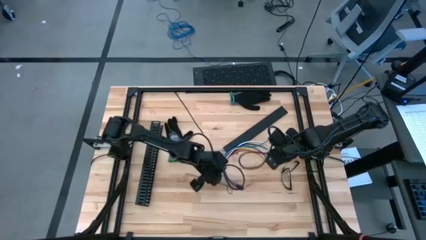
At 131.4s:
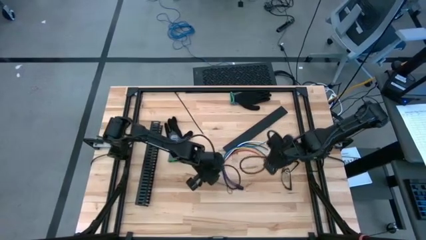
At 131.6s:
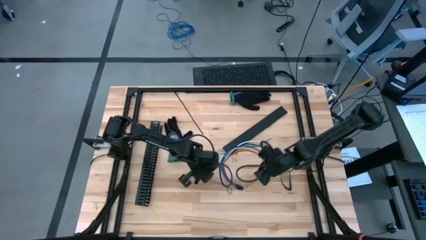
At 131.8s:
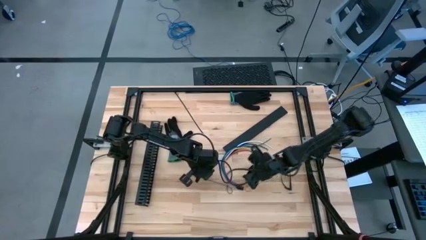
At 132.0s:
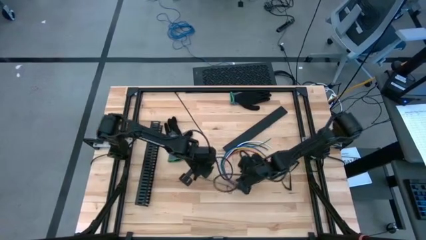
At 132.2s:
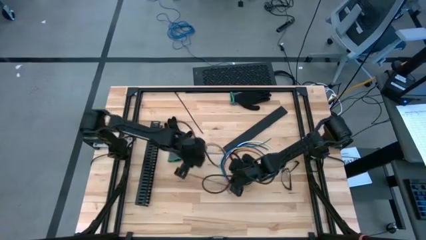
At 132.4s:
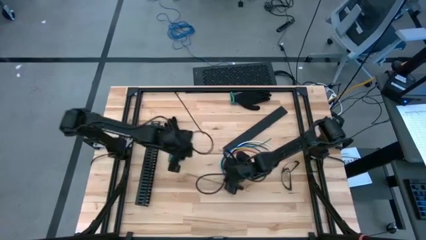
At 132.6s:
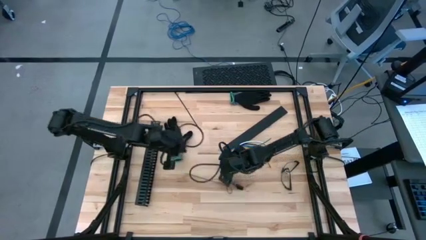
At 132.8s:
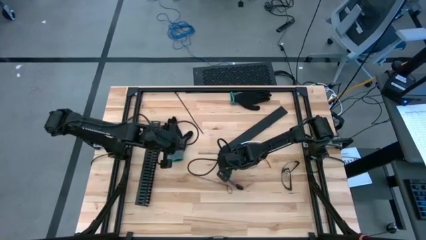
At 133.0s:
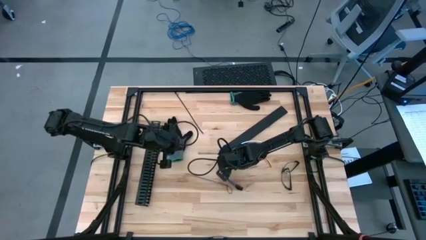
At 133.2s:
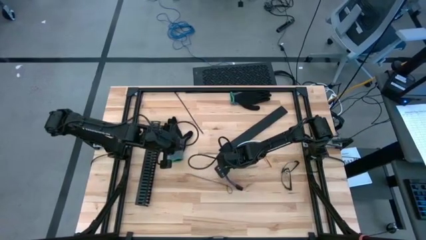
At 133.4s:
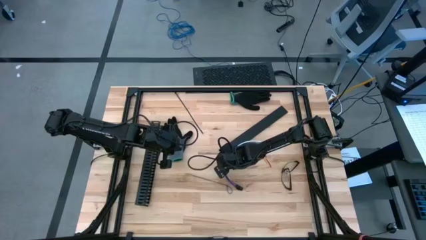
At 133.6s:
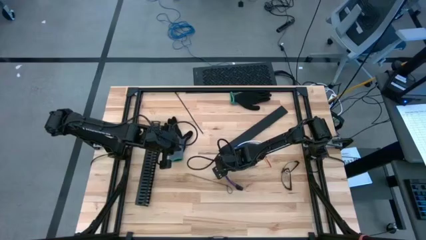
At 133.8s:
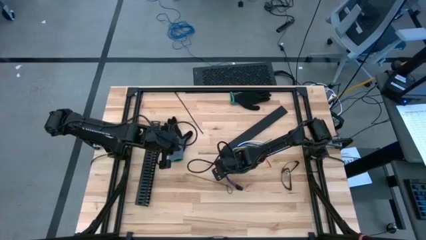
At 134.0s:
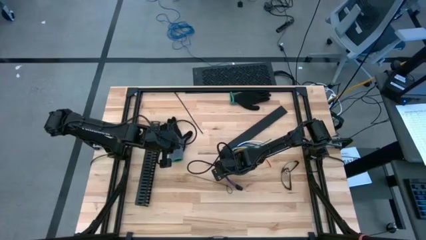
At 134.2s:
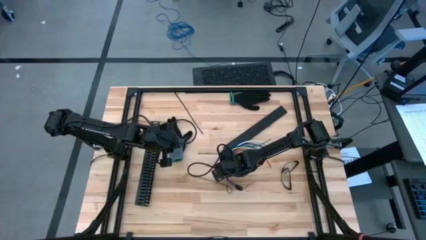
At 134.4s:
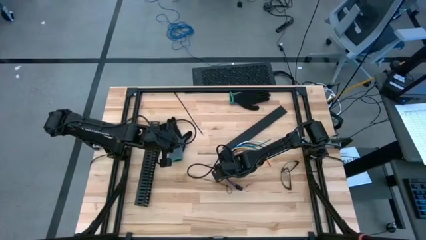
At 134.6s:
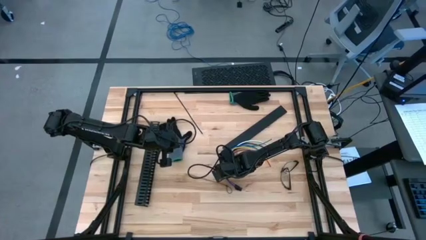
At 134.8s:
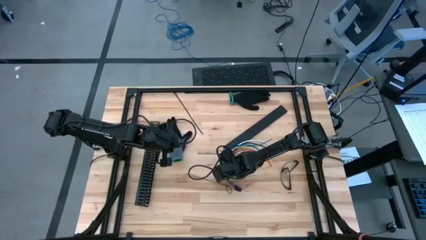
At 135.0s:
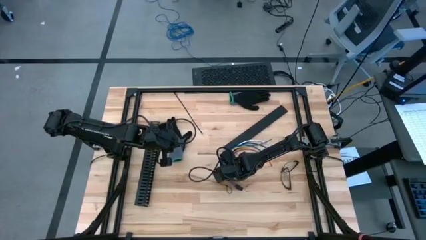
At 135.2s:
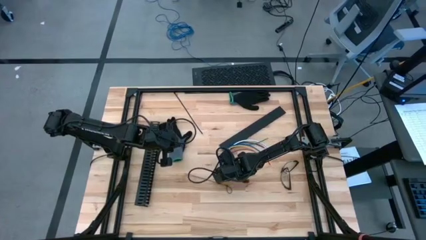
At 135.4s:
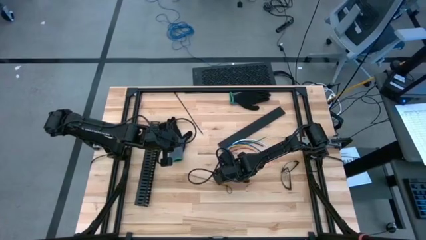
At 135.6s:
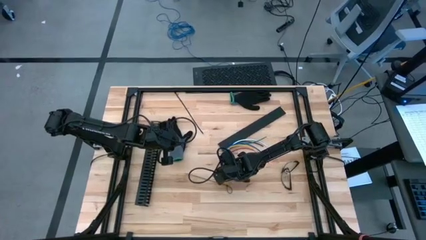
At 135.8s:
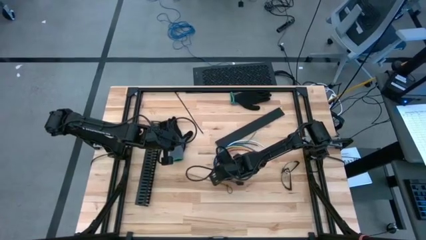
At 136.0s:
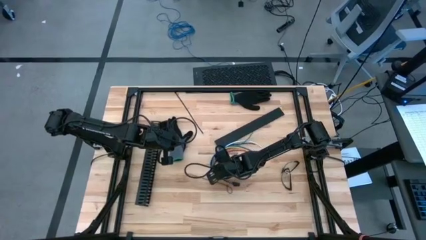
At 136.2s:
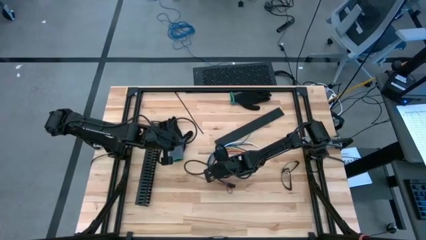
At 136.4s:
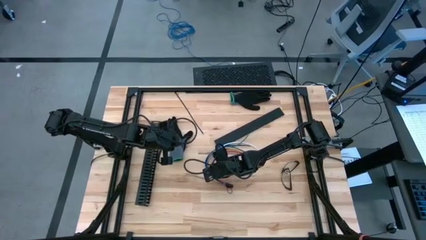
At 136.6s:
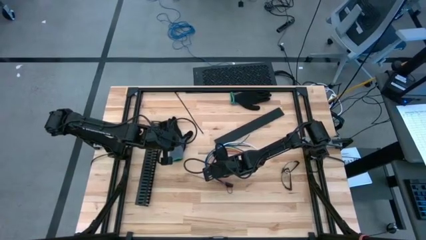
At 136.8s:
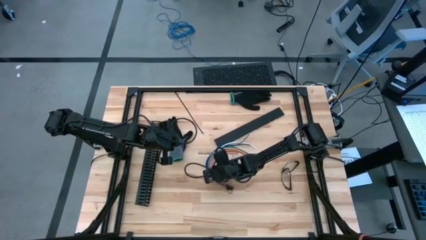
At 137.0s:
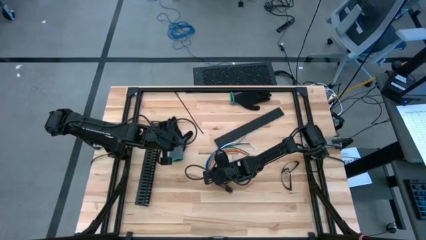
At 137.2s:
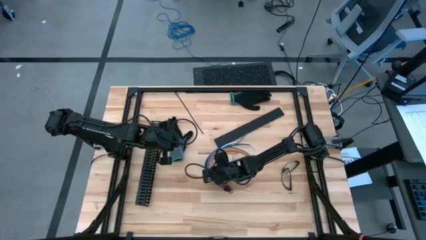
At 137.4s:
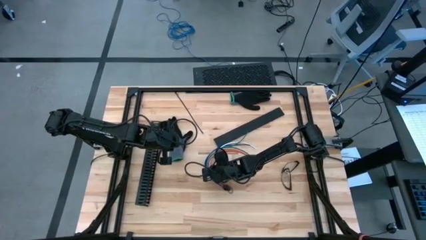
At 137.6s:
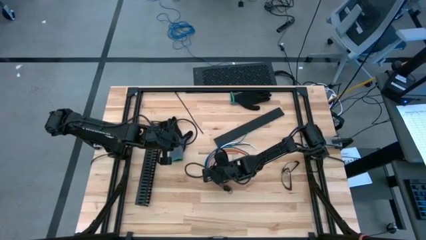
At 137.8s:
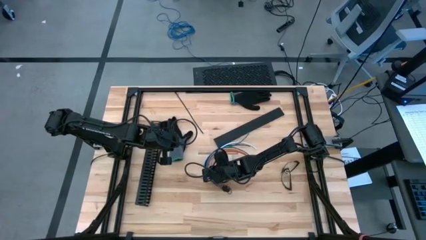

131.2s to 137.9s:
Task: Ziptie cables
Wrap the cable wires with the black zip tie

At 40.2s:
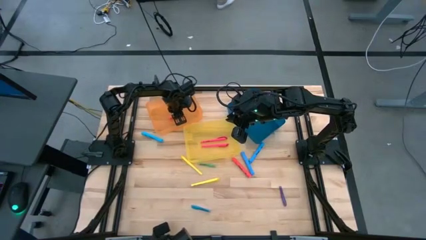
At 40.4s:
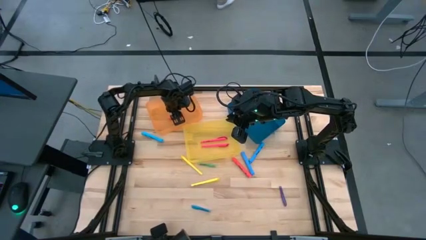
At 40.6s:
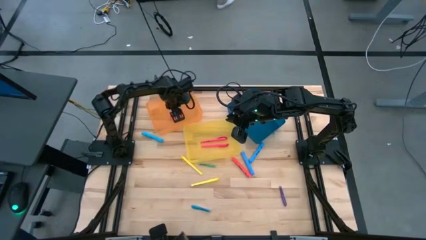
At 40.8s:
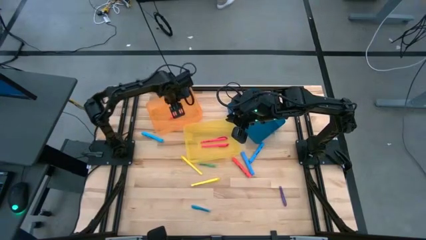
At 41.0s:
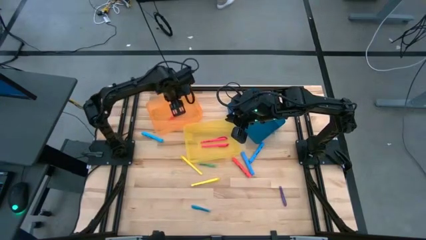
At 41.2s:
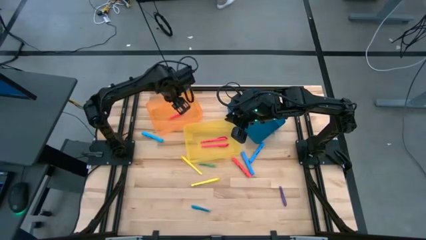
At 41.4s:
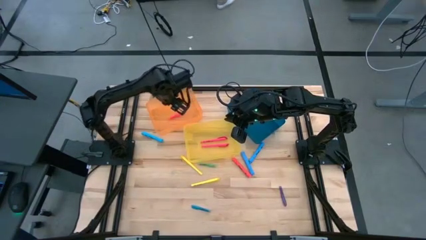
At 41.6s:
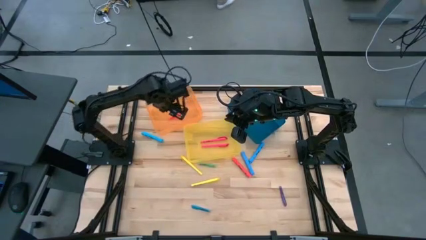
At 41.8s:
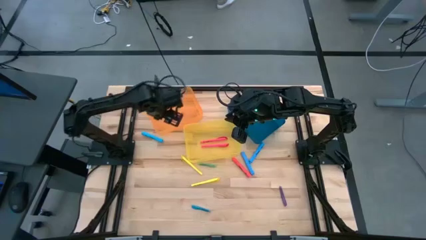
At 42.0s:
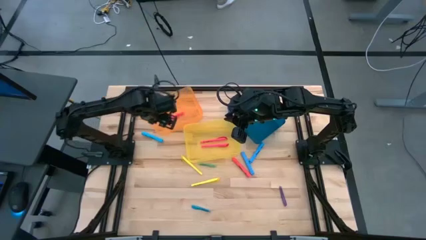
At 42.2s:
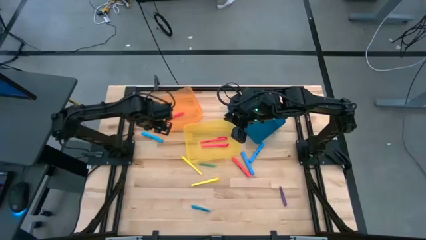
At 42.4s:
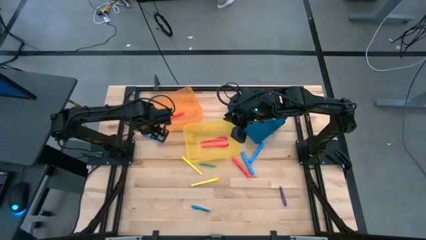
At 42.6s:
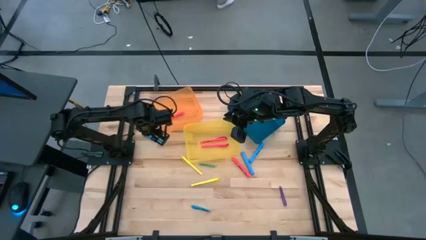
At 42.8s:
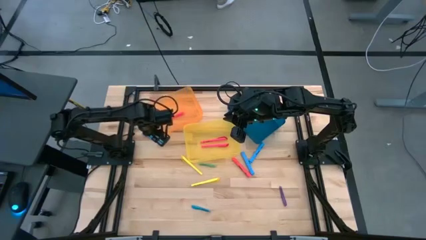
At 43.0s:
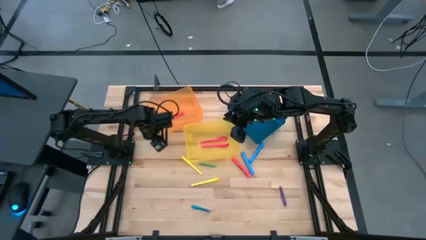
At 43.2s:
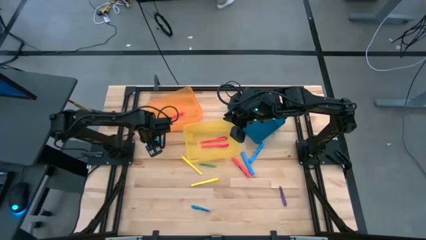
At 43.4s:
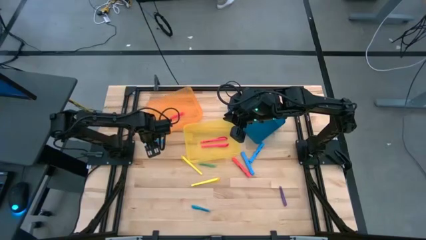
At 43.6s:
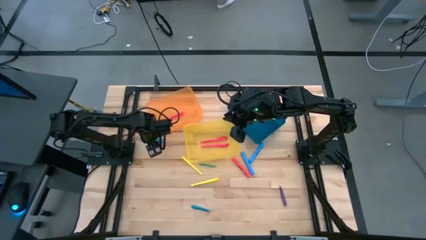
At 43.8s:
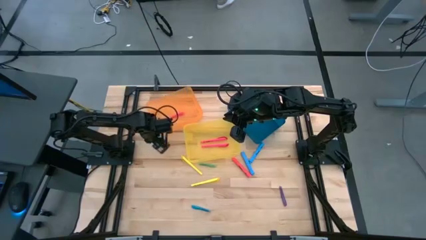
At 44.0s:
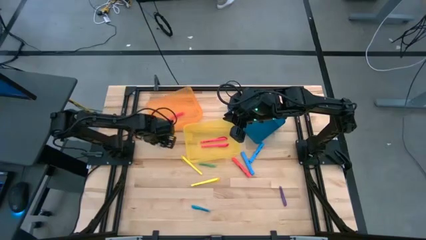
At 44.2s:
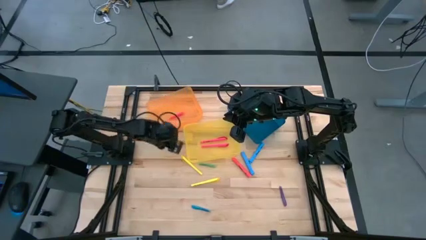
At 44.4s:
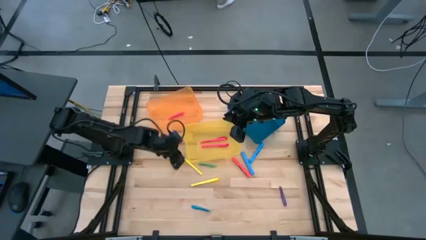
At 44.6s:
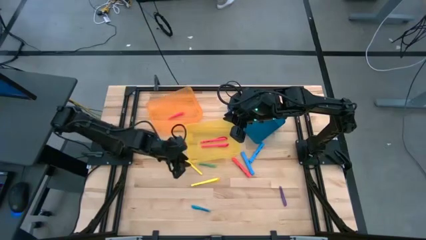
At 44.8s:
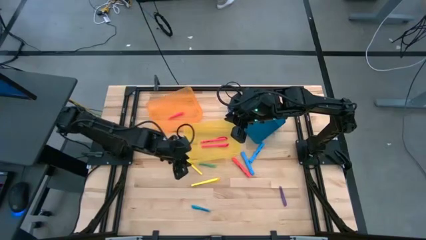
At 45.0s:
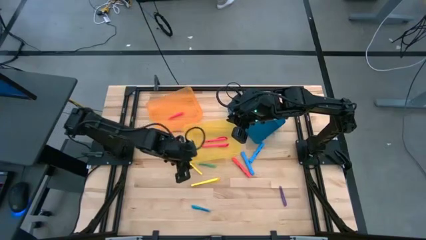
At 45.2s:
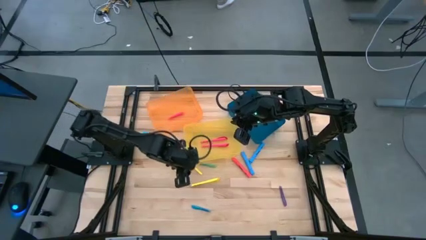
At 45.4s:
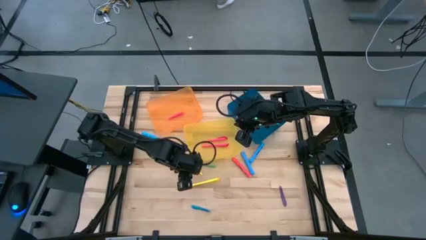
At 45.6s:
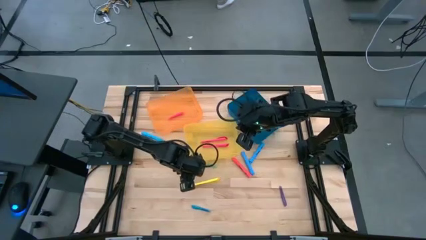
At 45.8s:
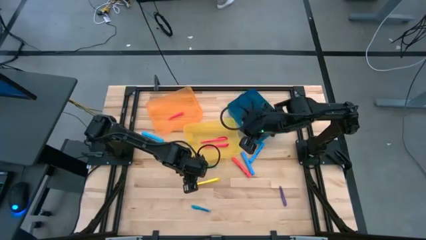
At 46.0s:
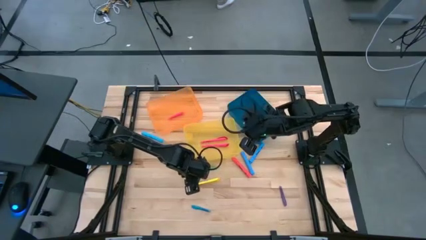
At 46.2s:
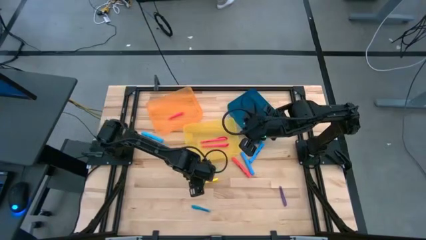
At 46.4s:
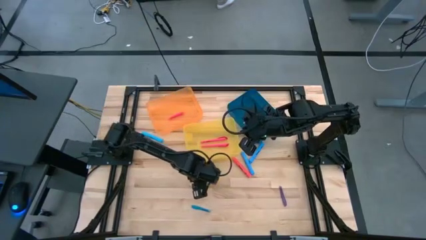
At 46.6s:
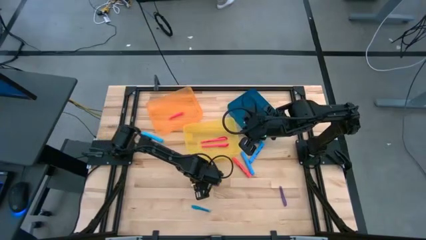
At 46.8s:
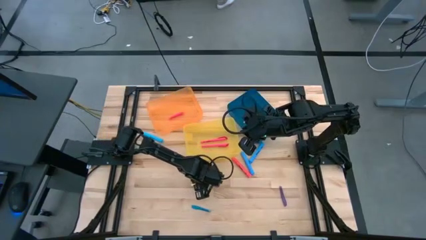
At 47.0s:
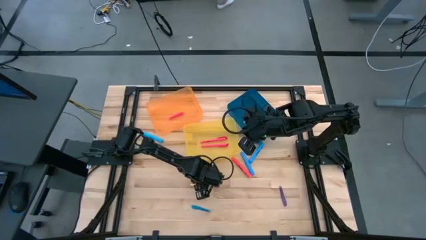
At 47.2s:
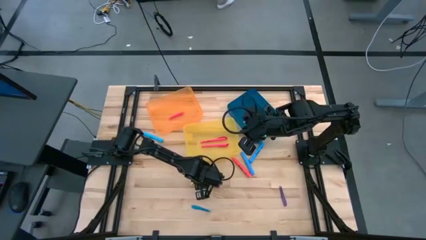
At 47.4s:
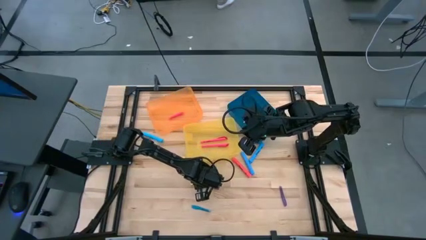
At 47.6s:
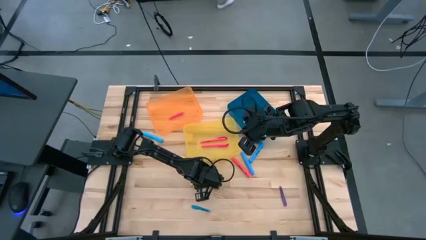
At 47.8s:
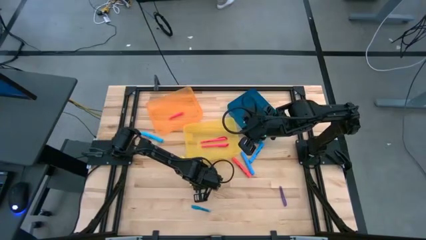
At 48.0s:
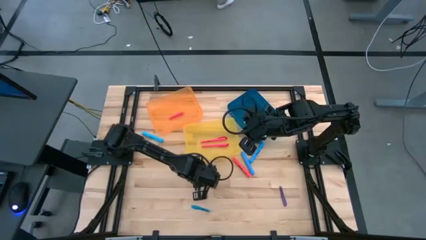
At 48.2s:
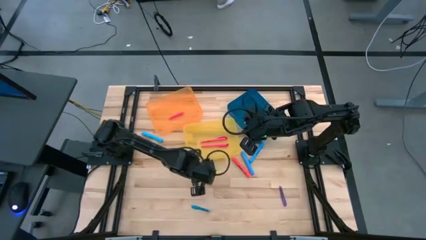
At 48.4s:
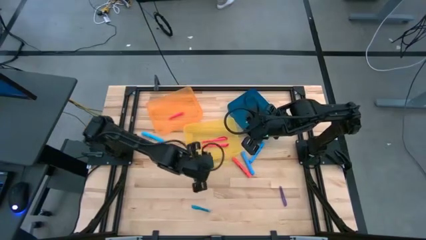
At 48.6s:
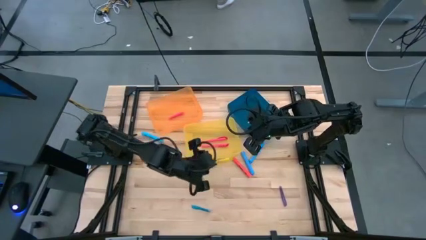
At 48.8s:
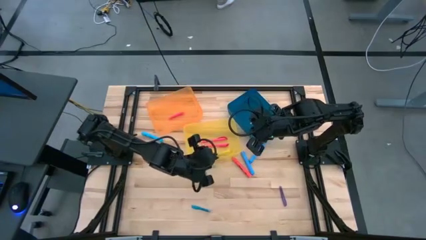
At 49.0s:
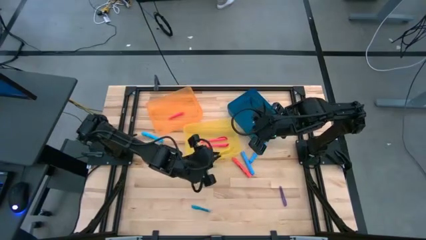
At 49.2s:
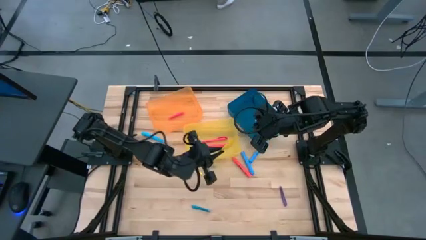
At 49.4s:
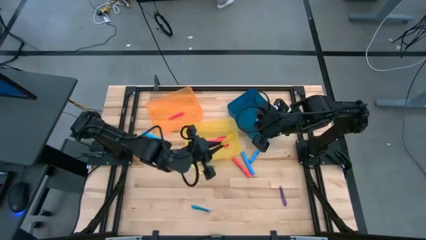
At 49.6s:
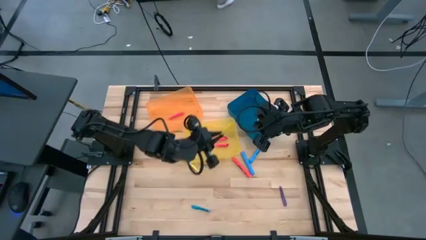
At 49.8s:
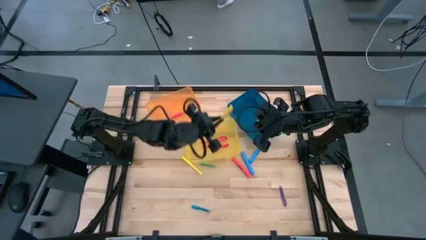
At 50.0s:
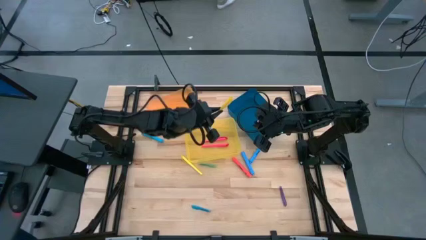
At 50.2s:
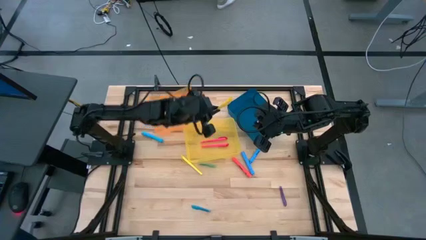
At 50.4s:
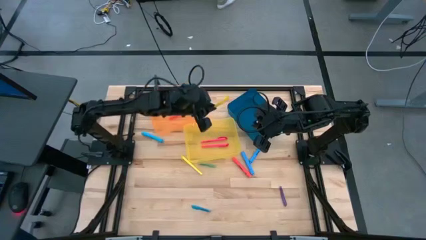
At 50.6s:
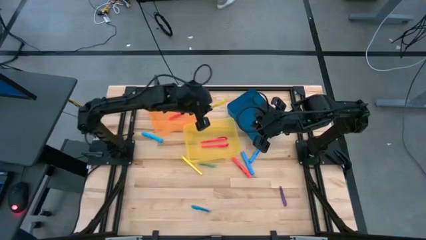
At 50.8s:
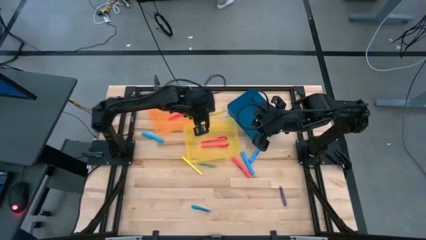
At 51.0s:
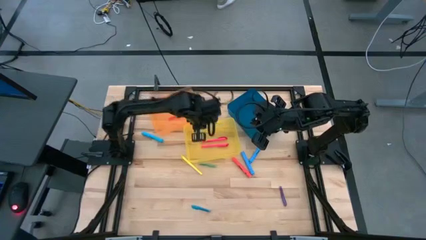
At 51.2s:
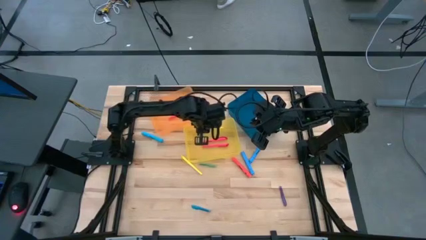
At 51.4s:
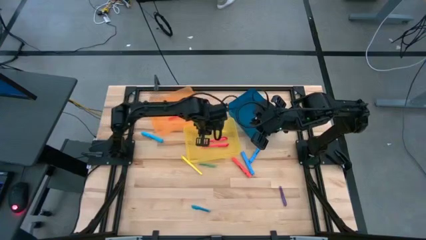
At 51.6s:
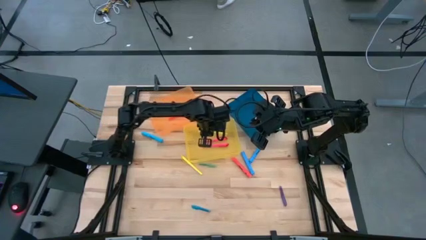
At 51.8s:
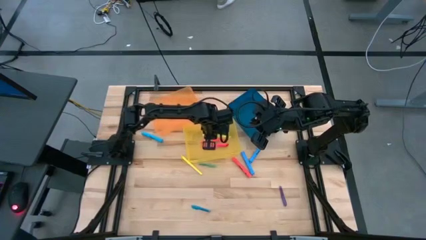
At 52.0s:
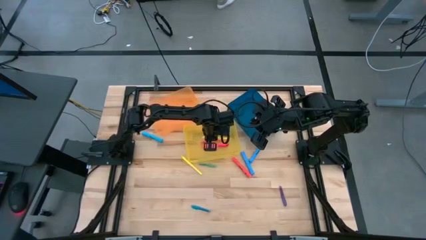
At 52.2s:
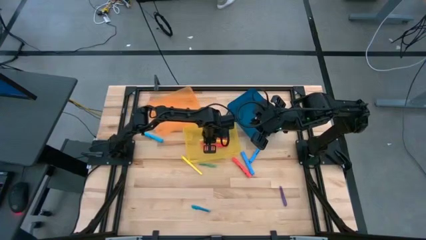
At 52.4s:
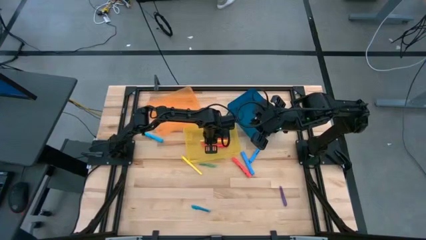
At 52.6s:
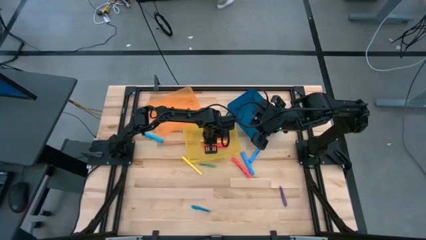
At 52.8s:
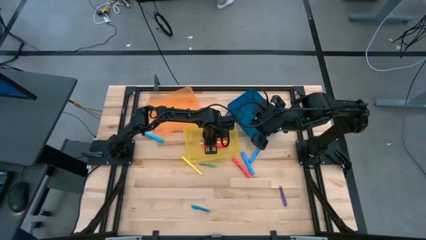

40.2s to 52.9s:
Task: Pick & Place Markers
Put the bottom medium yellow highlighter pen into the yellow bin
